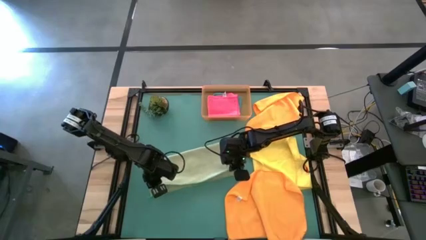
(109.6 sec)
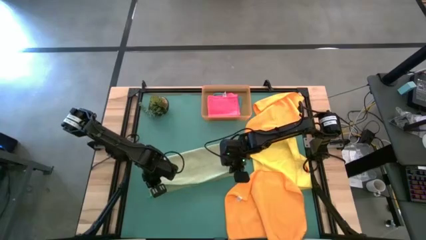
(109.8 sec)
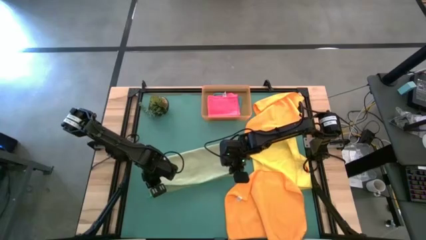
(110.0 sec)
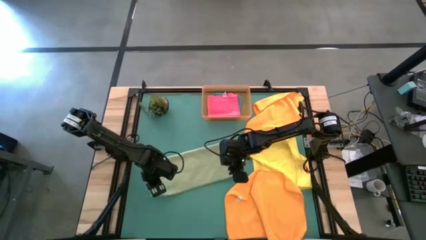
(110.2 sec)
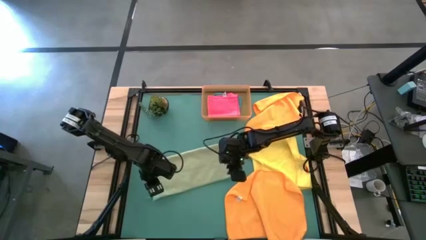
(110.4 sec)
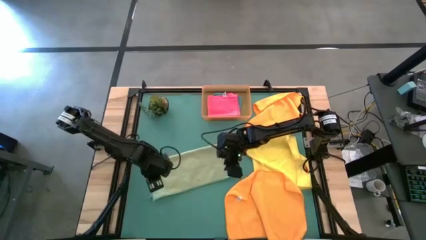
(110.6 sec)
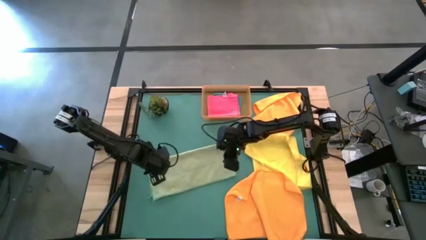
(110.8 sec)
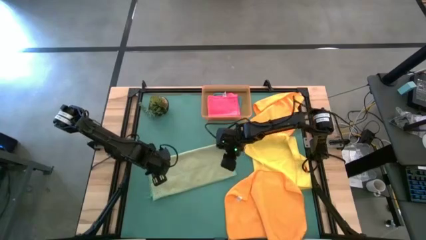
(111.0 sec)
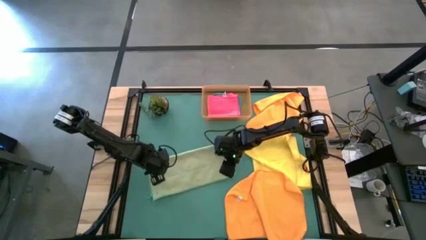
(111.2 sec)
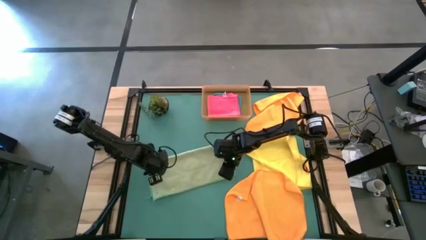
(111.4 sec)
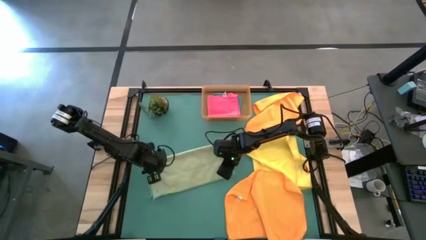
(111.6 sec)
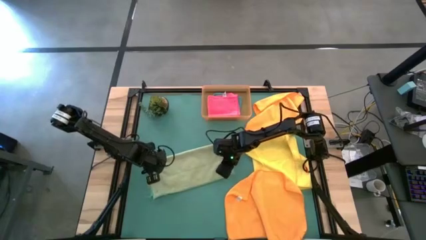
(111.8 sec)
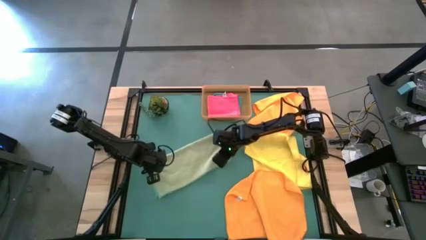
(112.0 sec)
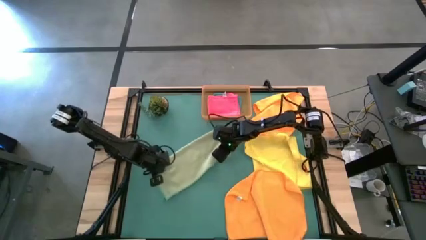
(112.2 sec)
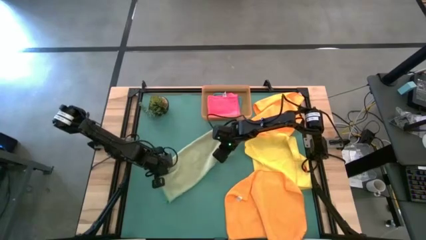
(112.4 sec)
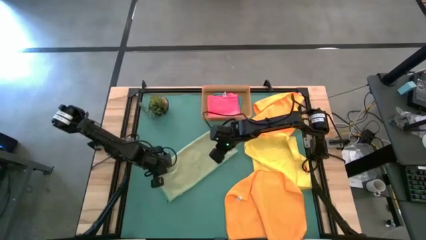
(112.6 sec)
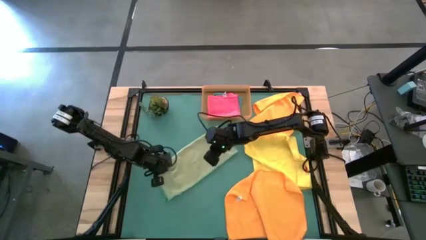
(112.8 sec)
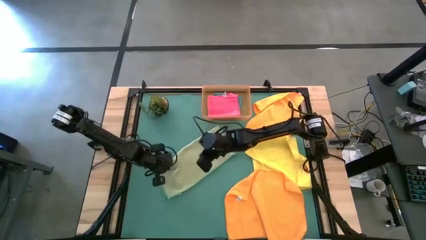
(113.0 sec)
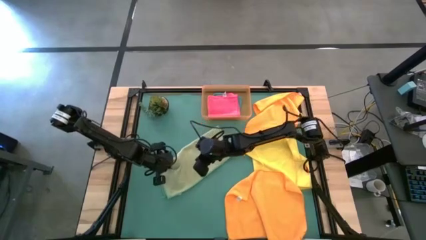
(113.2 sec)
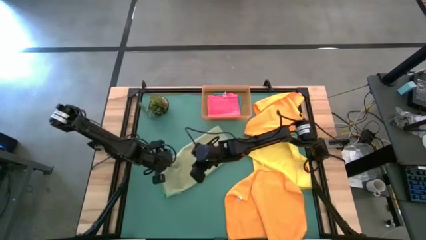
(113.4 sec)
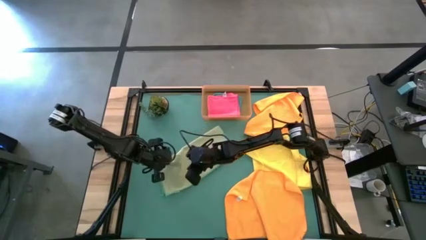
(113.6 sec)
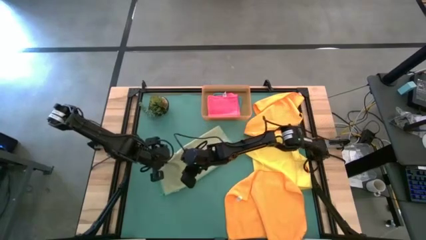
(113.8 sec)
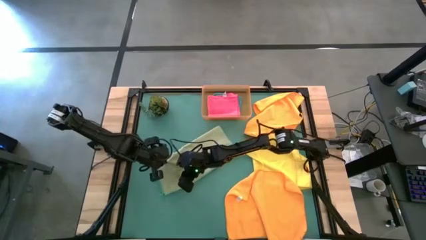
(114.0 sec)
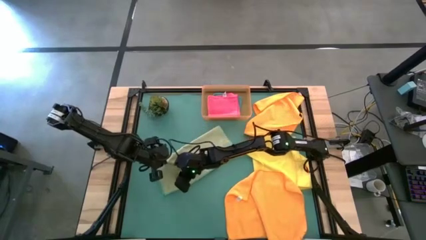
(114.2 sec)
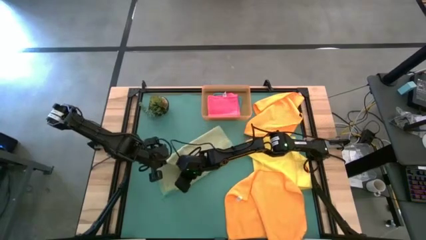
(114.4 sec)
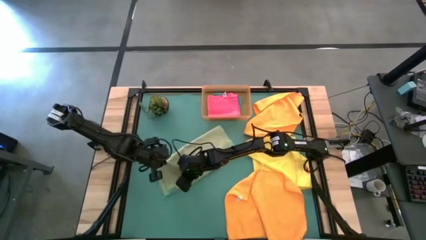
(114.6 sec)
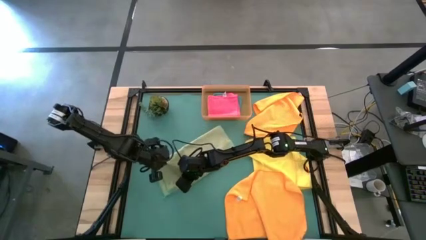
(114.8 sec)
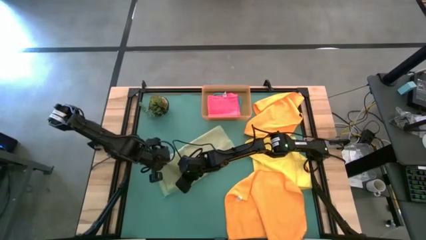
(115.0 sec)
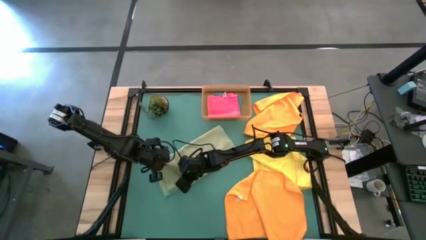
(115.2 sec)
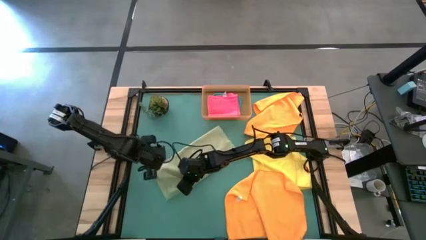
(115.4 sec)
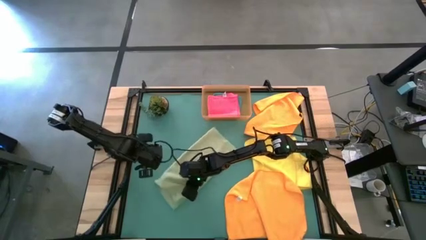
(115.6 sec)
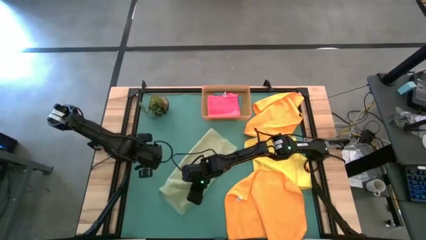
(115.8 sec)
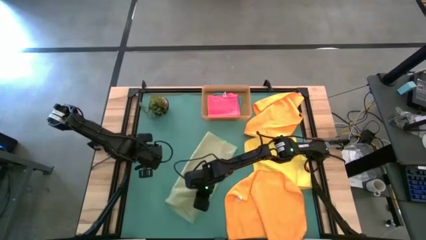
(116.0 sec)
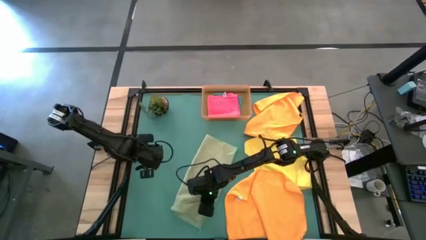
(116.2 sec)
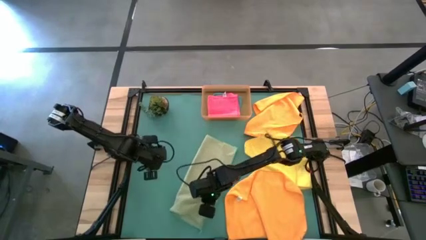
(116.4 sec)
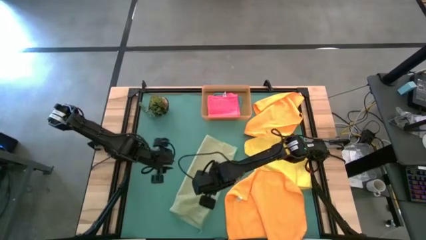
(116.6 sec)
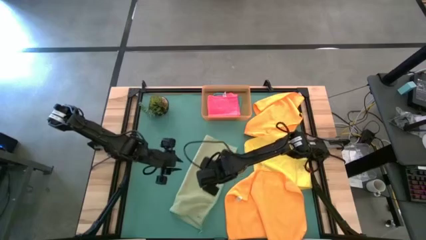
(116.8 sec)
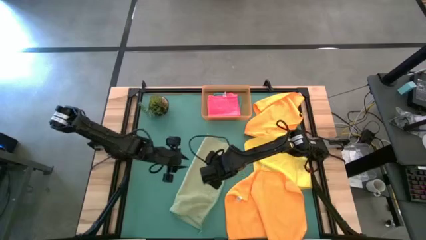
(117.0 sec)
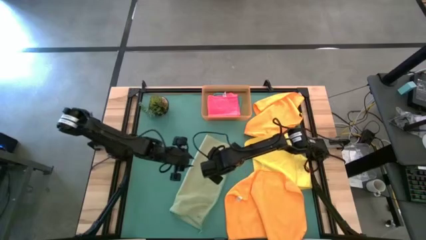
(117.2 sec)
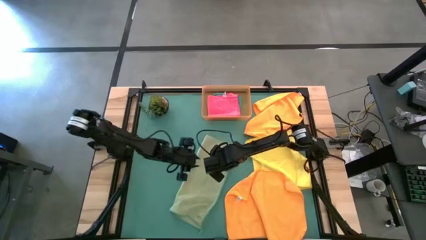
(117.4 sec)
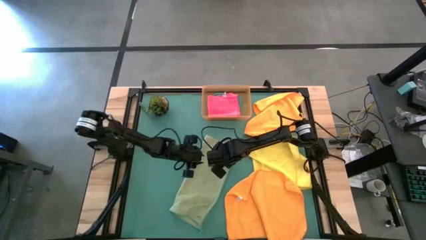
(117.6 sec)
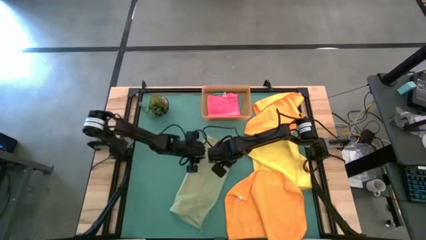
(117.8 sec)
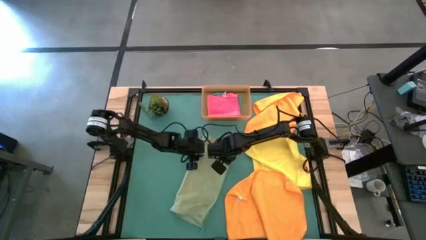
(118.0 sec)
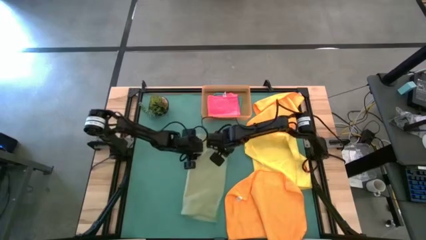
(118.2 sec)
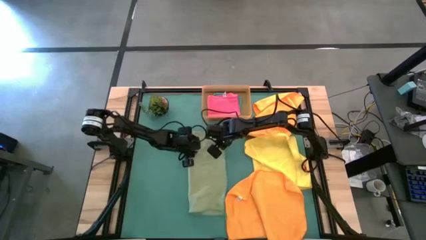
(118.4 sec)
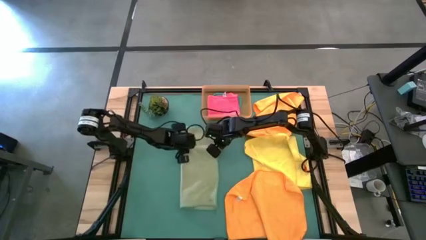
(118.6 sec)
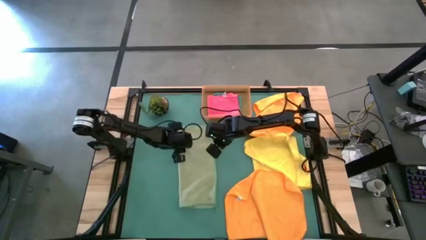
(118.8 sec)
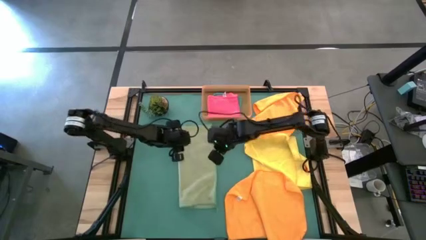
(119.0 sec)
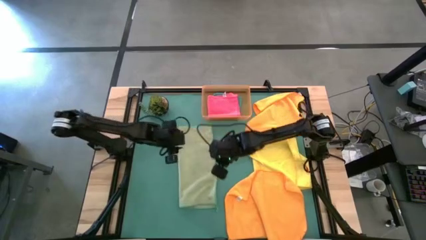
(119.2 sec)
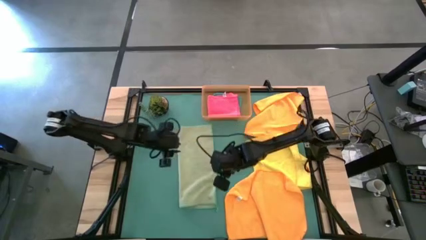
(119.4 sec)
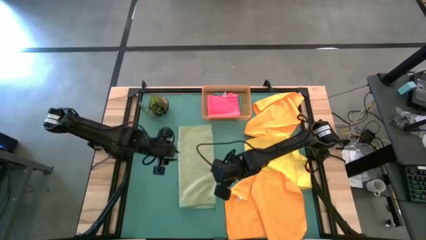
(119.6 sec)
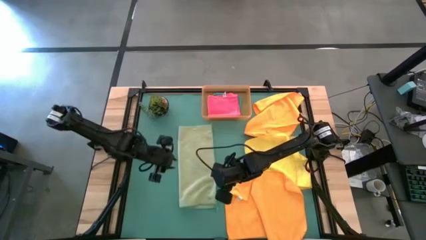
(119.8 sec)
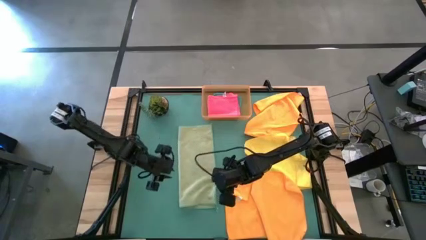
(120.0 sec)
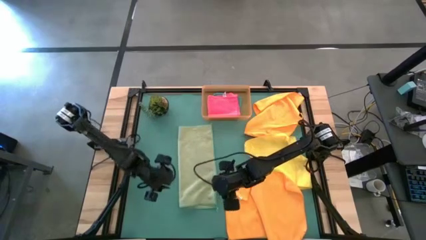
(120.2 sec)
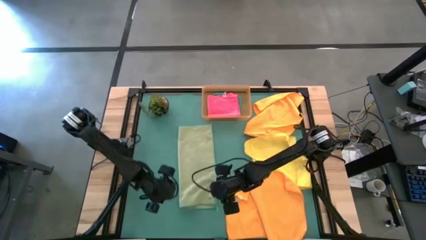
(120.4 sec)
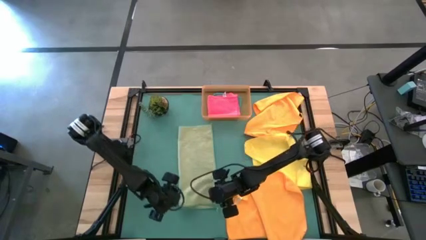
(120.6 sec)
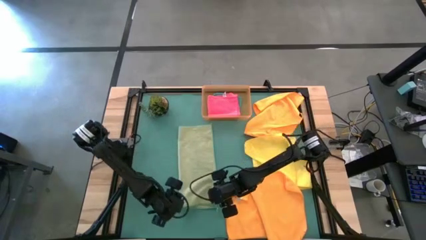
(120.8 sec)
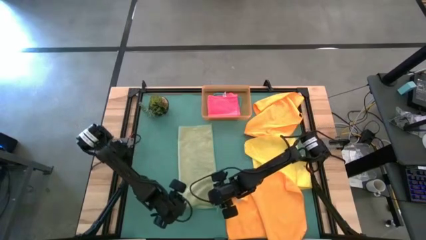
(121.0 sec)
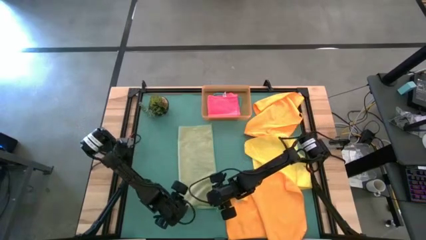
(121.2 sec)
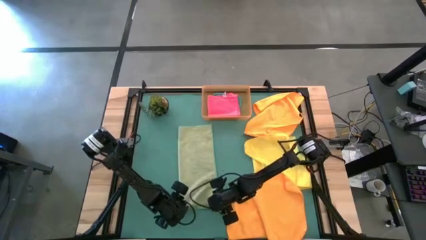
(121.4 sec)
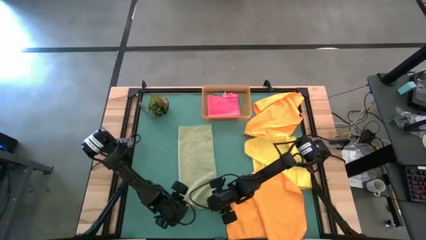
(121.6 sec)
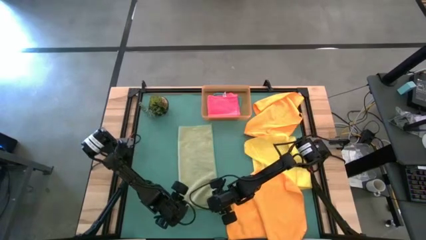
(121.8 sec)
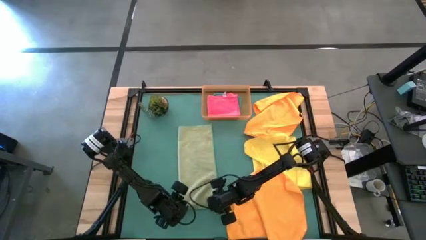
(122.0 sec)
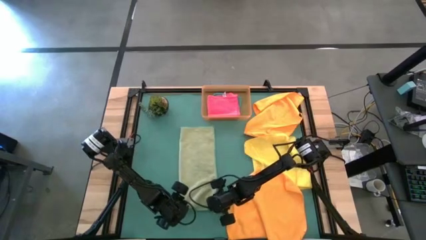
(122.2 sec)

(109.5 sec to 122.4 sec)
Task: Fold microfiber towels
Fold the green microfiber towel

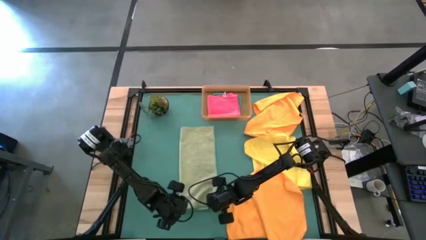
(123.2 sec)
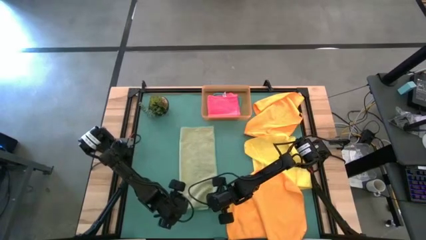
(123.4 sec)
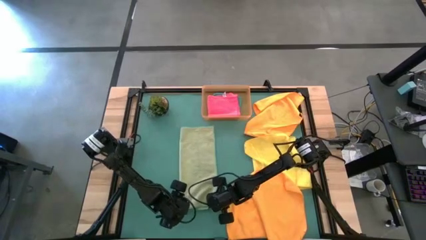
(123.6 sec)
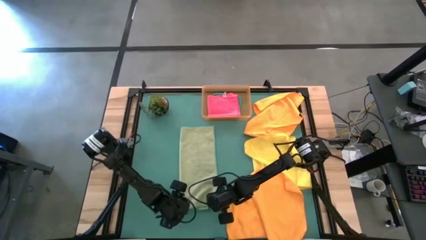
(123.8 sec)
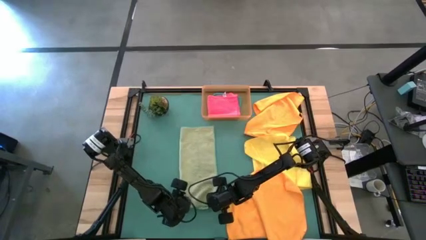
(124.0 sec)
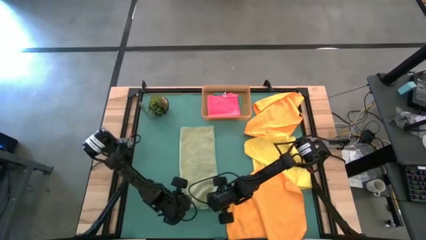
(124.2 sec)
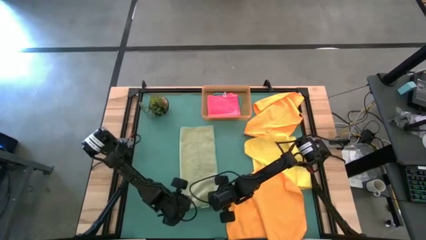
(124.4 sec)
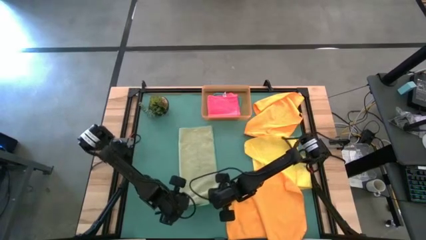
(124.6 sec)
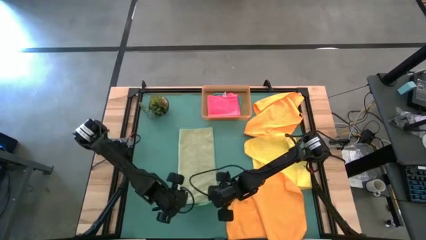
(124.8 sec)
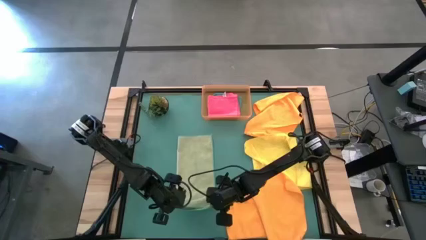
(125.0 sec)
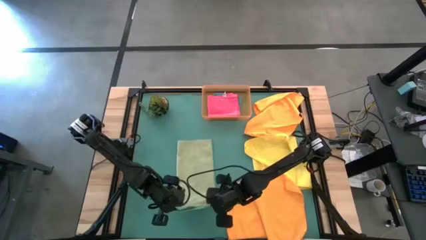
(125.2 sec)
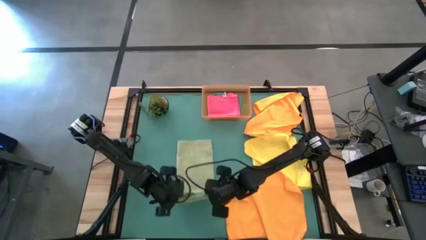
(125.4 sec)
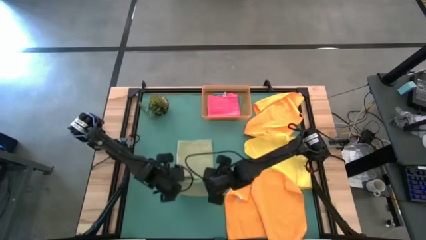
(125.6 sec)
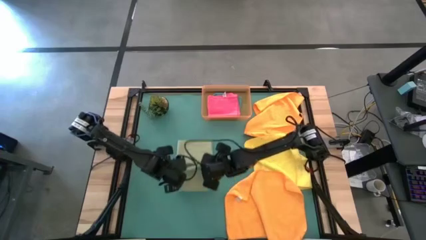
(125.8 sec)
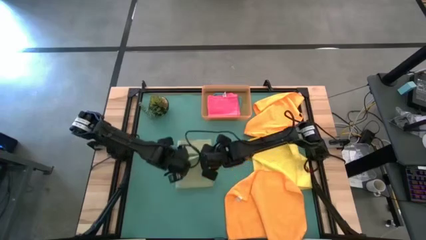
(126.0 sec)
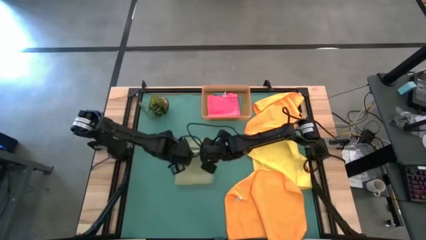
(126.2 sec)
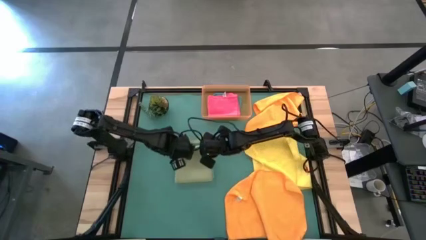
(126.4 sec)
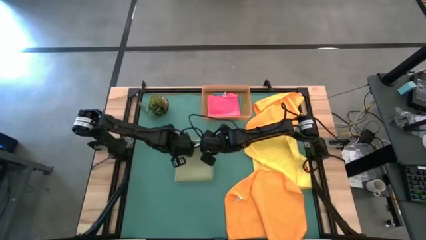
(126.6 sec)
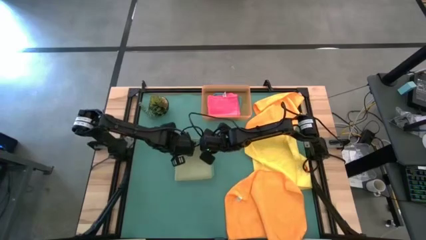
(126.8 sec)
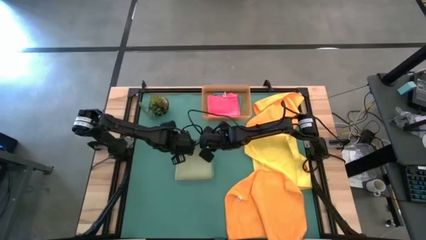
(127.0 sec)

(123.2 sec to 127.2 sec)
Fold the green microfiber towel
